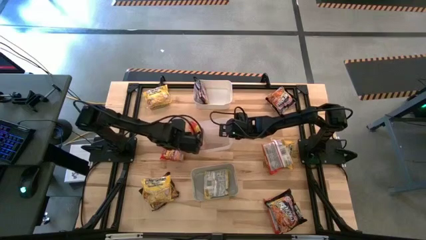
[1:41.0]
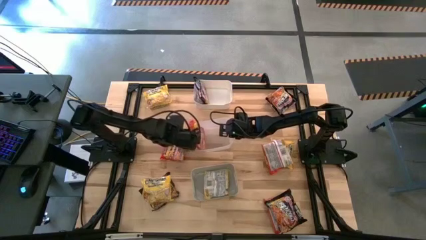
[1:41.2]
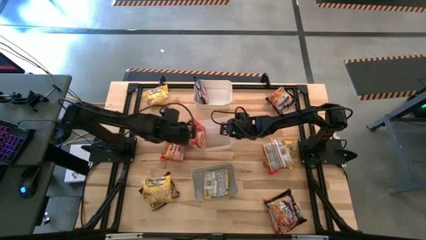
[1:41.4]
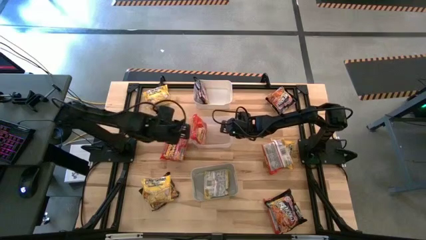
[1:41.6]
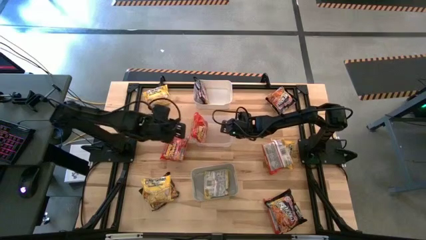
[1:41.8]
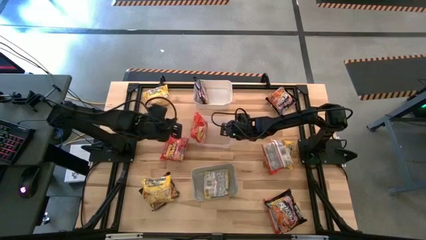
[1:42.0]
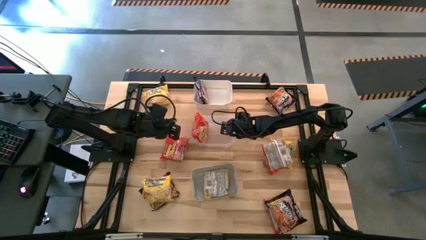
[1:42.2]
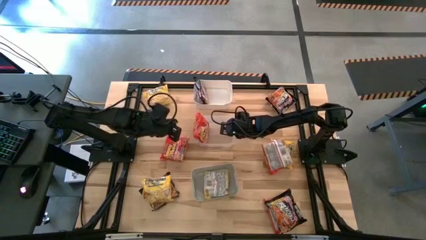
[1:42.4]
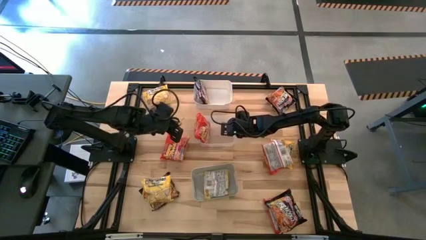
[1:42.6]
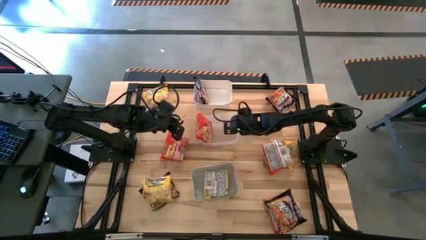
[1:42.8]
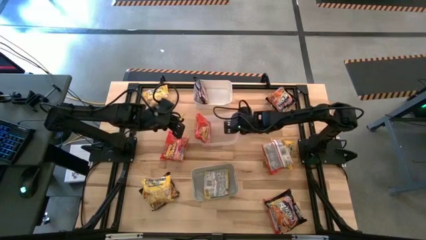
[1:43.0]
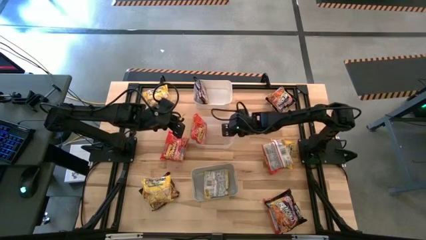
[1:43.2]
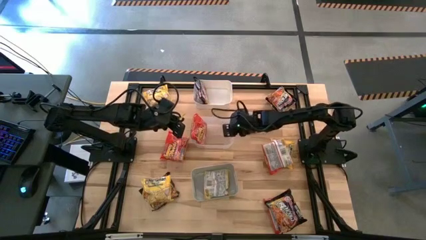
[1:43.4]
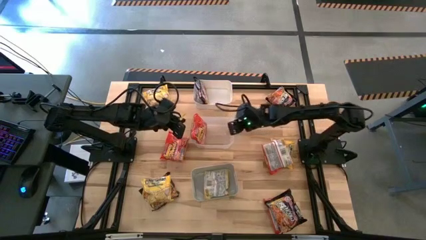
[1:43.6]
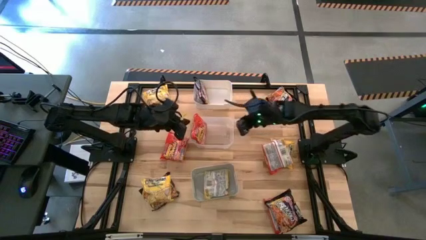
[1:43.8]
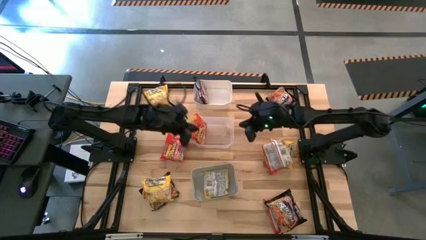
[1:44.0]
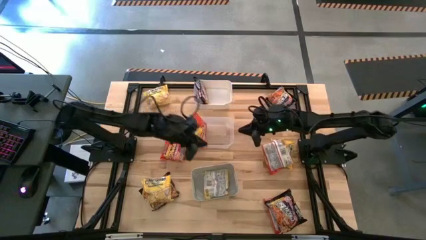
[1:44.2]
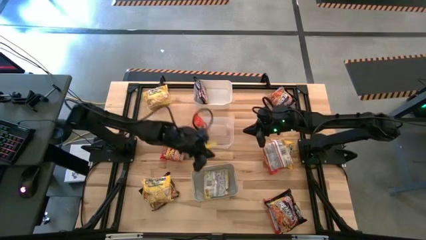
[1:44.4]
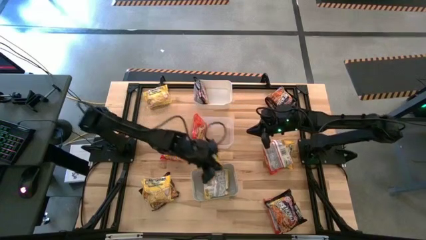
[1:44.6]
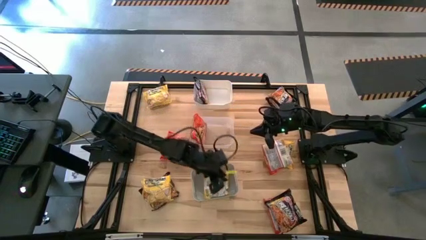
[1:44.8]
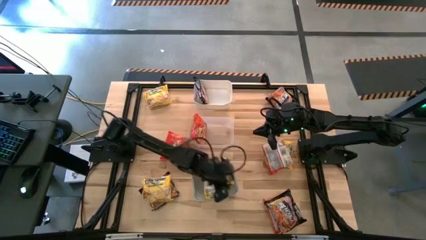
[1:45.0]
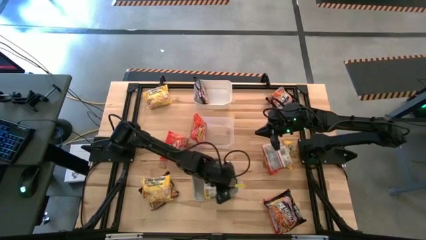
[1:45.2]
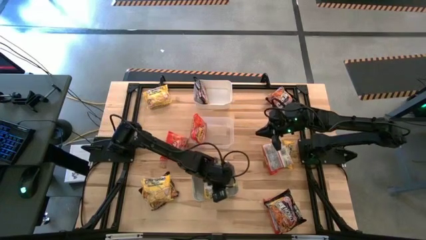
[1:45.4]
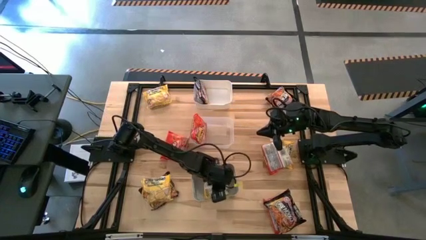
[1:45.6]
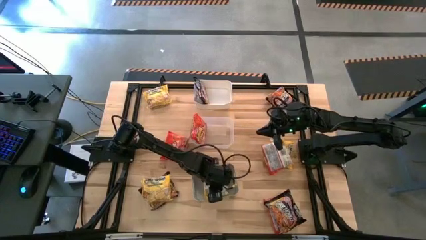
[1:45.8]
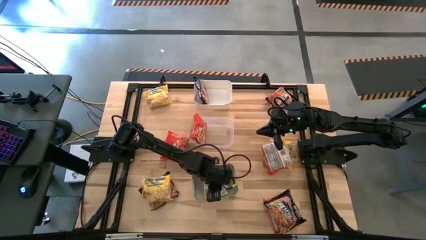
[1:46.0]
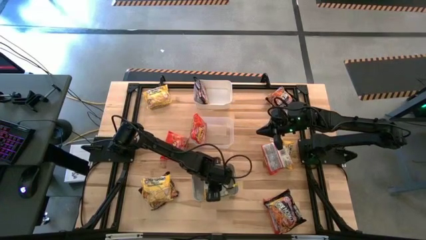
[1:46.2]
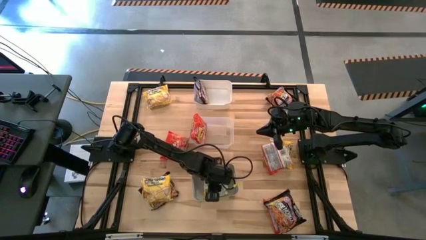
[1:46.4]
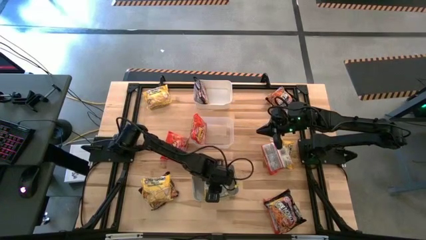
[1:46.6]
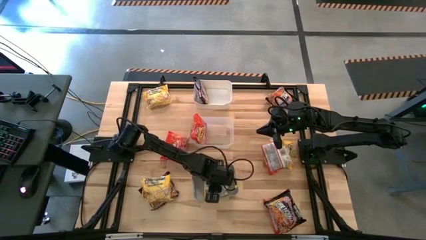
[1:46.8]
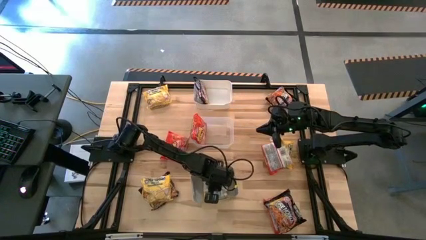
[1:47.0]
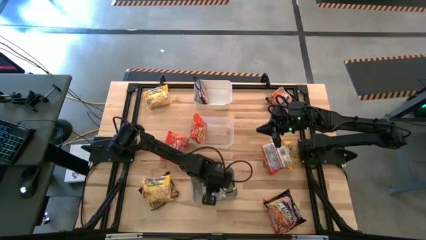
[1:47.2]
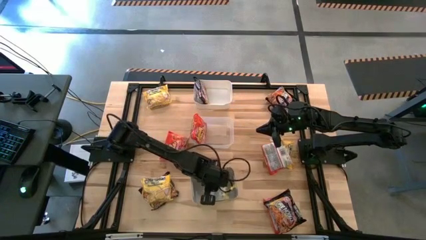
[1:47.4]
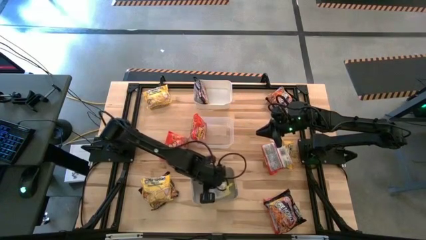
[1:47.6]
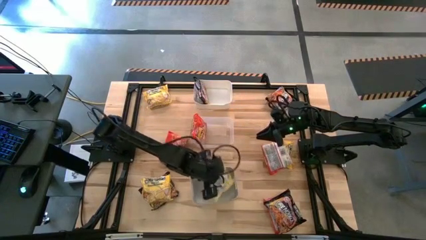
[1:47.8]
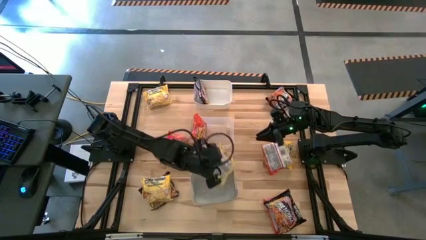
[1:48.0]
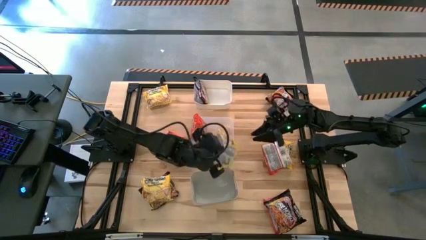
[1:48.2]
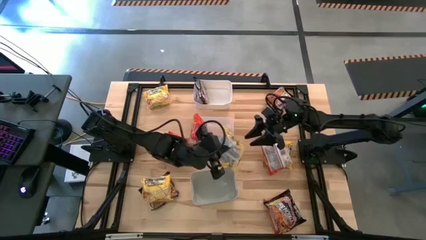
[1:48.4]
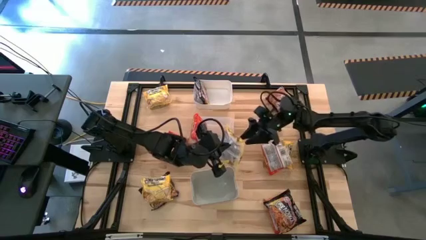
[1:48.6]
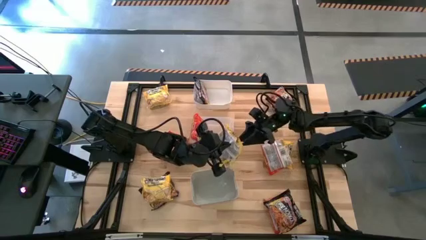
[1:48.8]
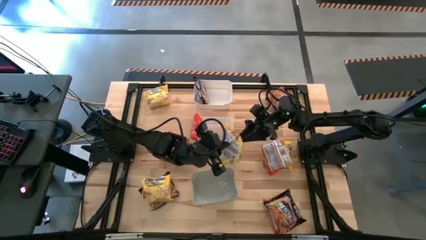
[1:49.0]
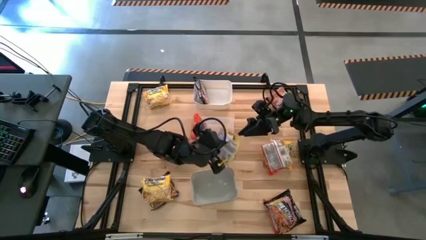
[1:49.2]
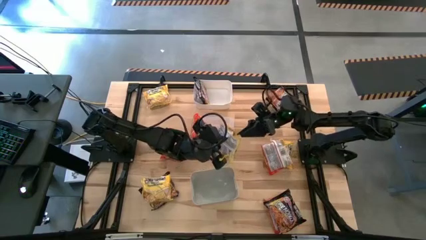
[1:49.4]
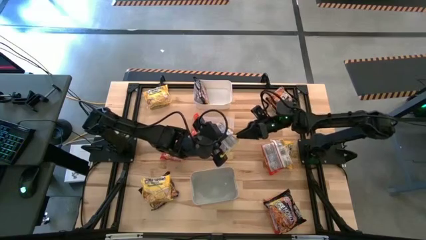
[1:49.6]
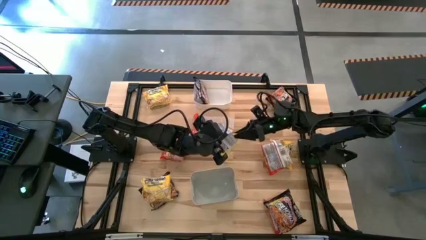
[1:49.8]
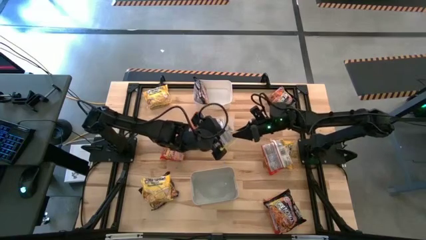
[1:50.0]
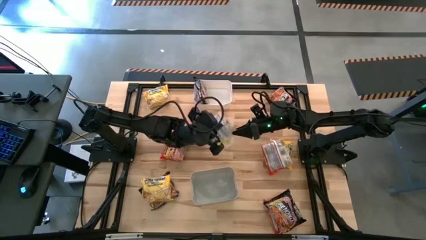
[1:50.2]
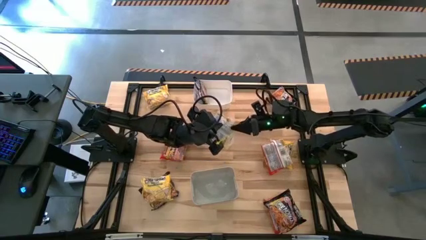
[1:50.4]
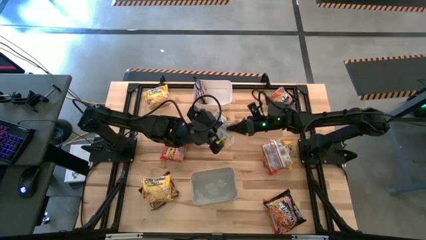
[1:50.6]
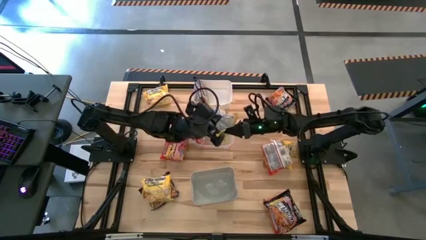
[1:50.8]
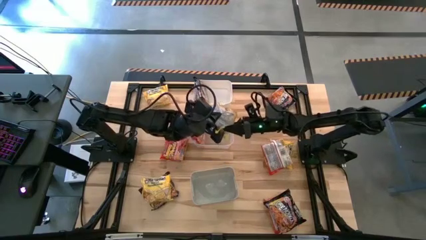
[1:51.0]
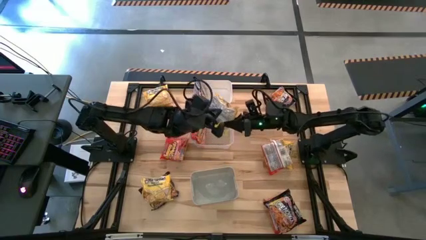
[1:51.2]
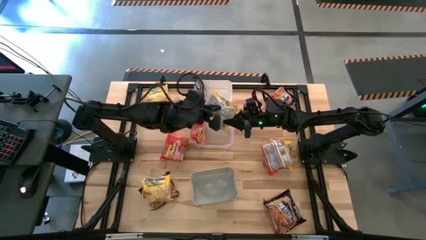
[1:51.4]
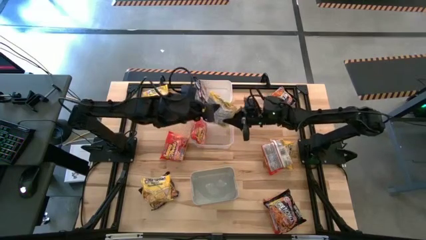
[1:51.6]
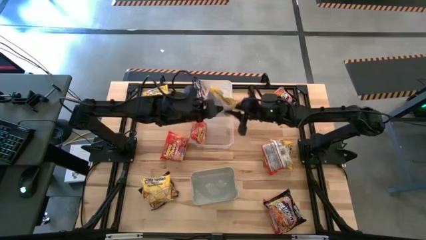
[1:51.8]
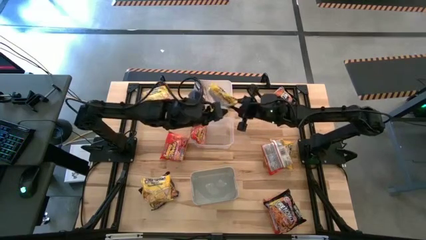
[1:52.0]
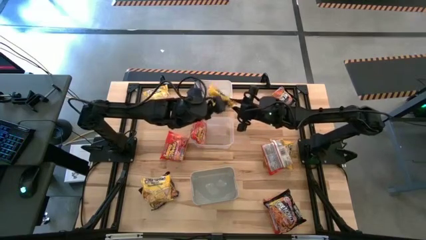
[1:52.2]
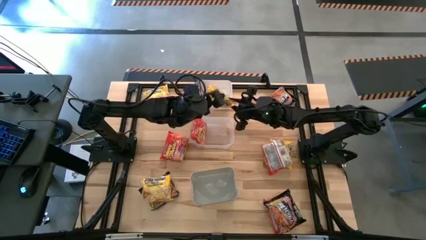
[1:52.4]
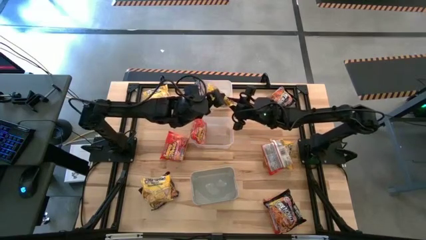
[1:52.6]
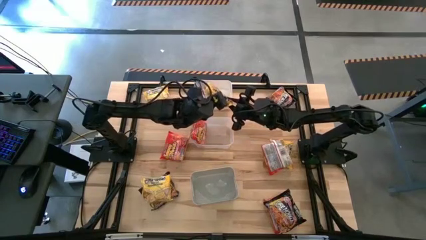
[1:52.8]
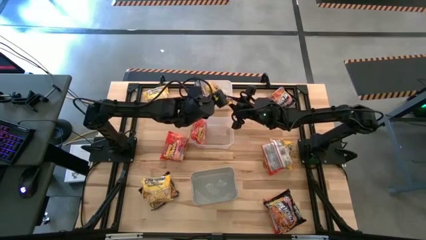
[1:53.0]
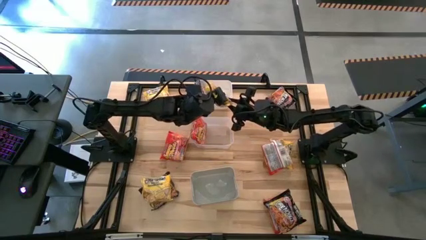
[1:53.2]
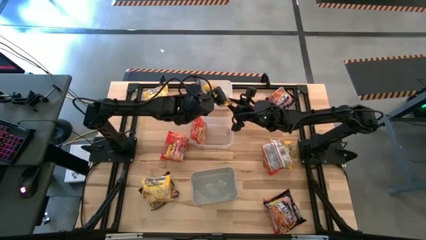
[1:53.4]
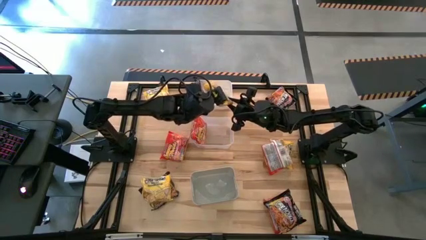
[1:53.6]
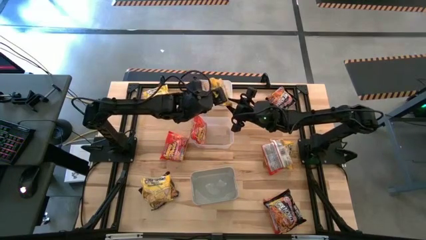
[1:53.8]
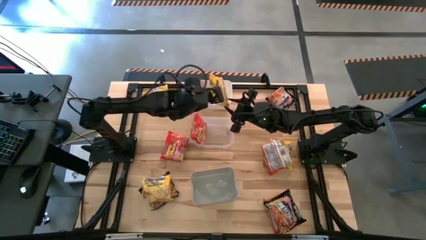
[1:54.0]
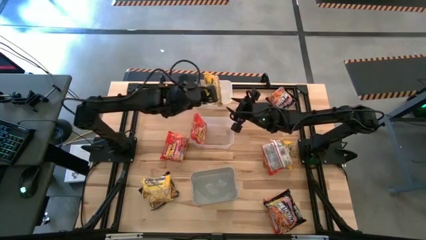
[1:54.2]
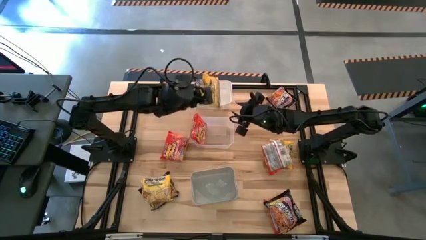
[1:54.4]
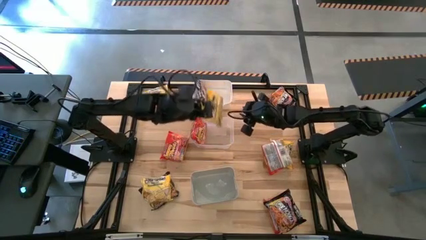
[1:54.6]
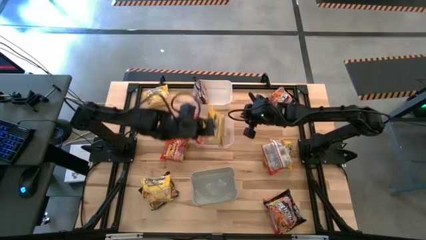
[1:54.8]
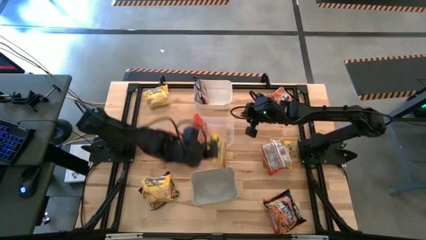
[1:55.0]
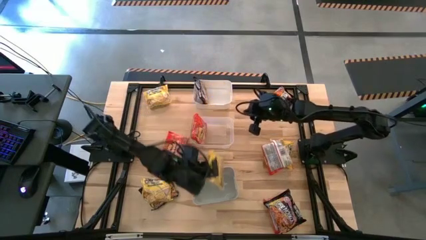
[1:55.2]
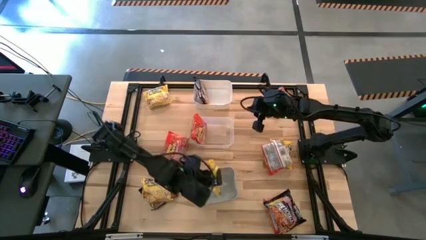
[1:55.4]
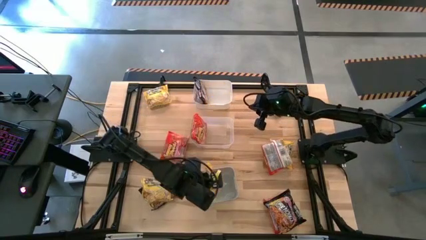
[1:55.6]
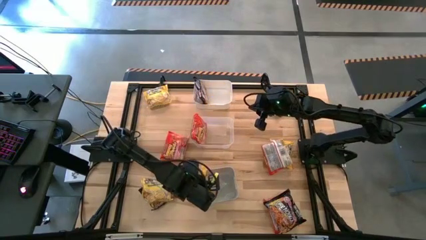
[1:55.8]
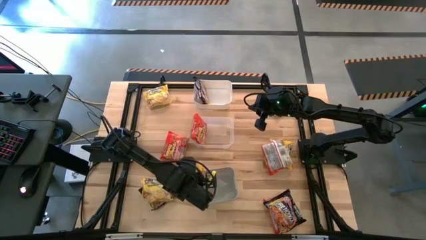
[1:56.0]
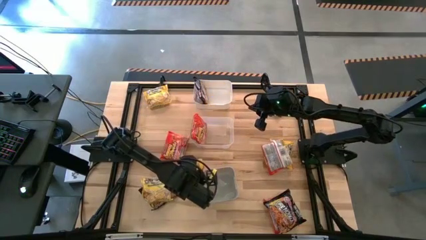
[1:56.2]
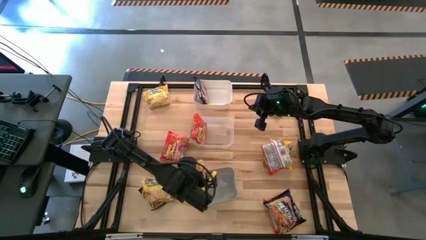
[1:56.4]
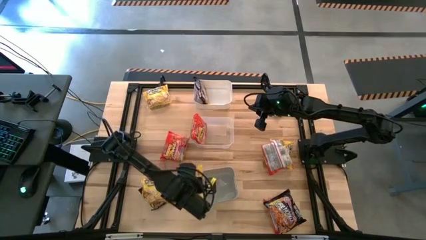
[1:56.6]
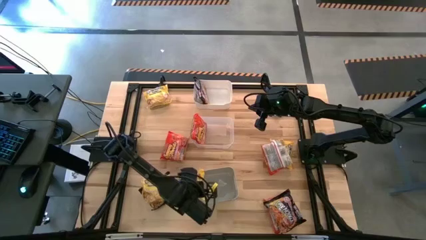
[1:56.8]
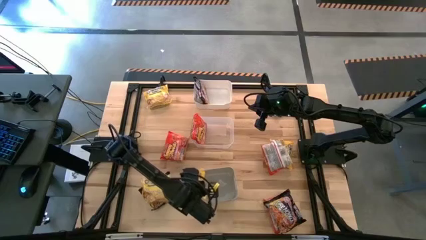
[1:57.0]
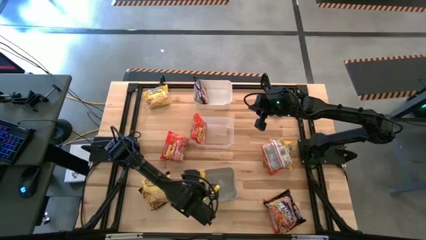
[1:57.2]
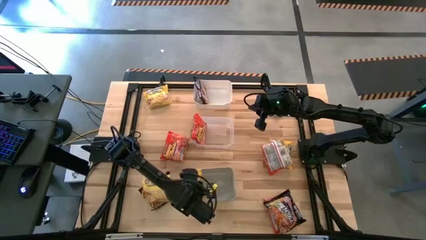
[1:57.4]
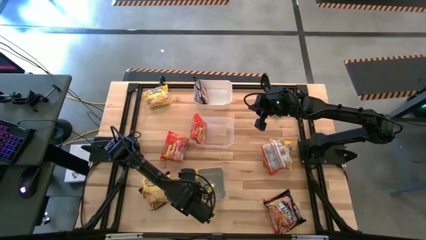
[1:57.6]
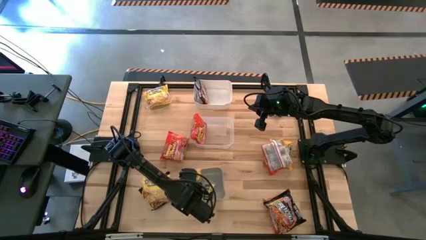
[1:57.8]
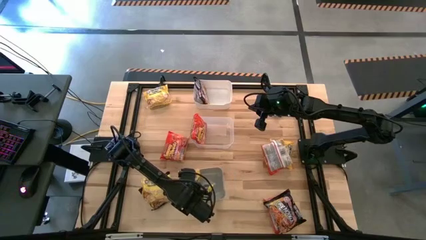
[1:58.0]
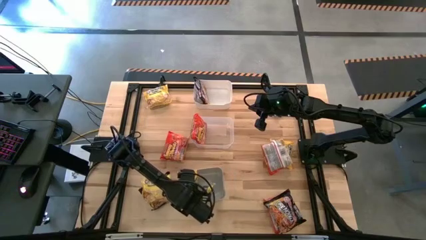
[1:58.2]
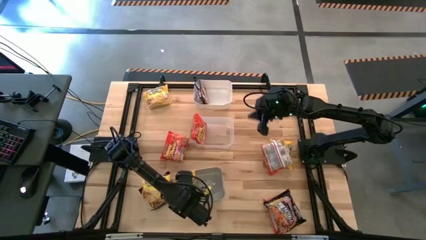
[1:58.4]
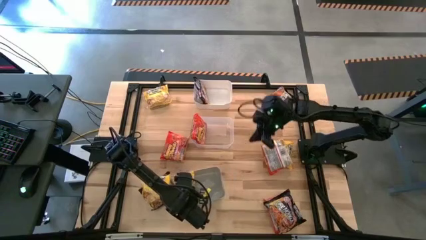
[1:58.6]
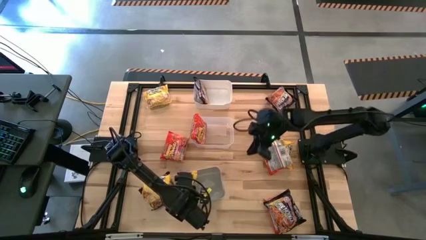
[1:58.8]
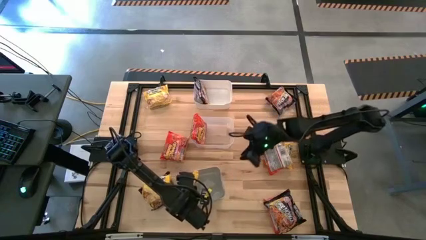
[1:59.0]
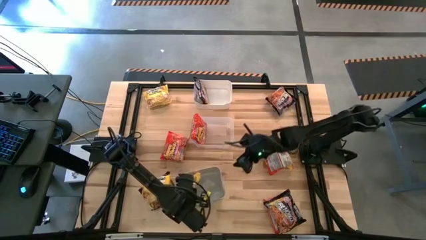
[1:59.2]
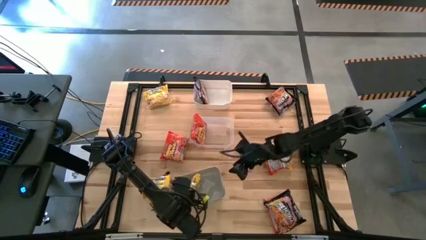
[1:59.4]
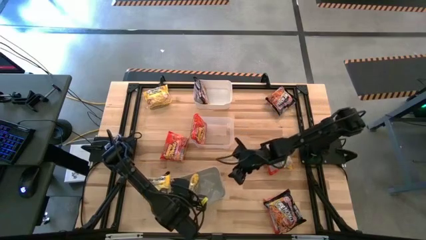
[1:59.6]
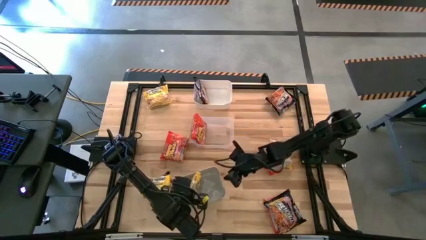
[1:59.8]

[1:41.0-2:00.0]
Task: Sort Maruchan noodles
Put the yellow noodle pack into the gray bin
